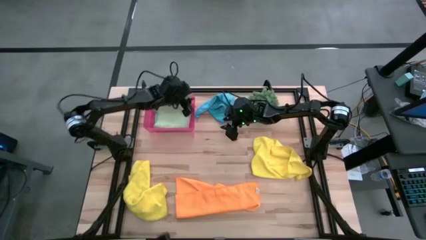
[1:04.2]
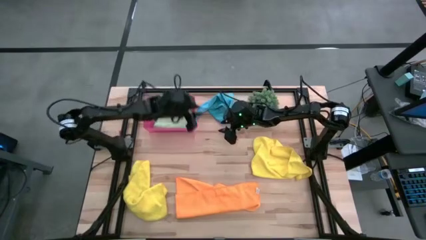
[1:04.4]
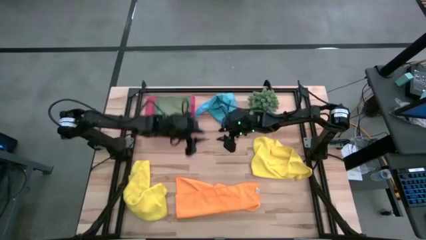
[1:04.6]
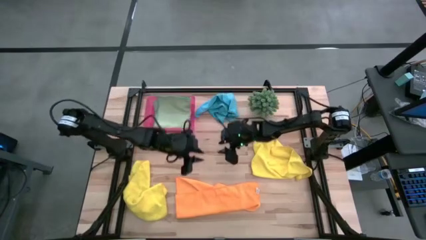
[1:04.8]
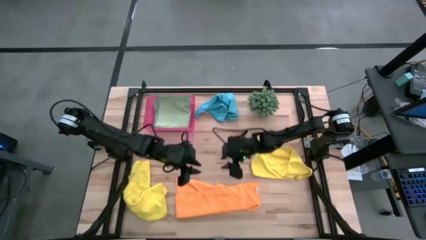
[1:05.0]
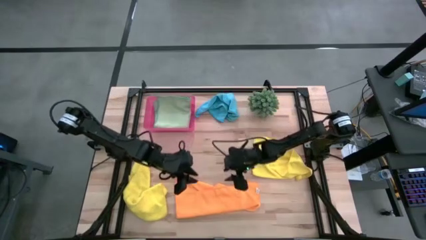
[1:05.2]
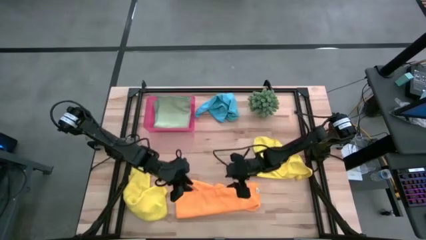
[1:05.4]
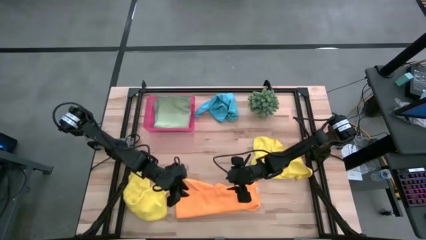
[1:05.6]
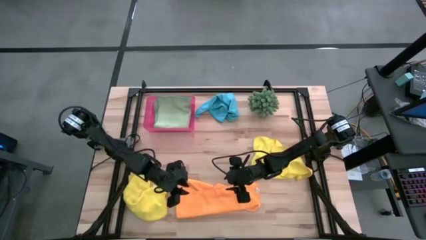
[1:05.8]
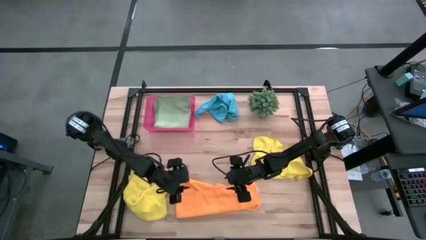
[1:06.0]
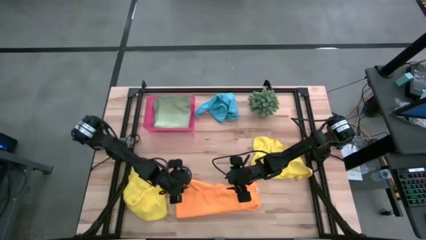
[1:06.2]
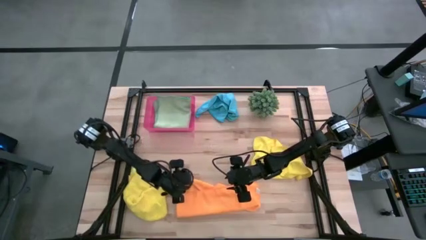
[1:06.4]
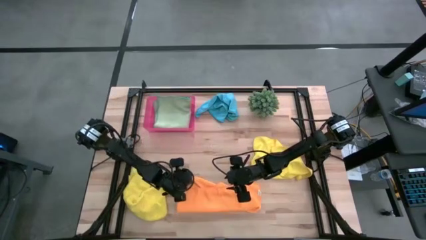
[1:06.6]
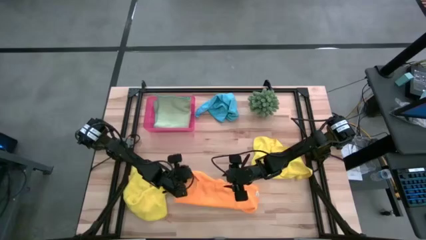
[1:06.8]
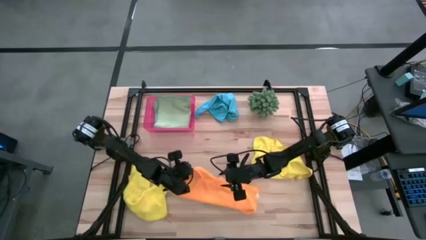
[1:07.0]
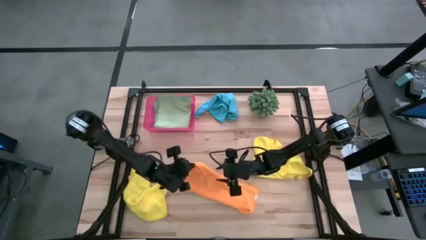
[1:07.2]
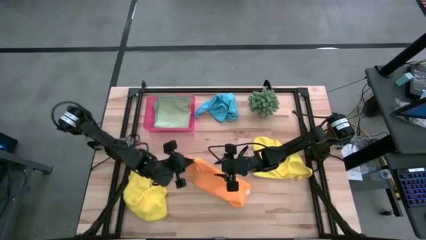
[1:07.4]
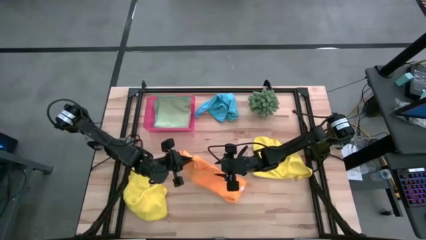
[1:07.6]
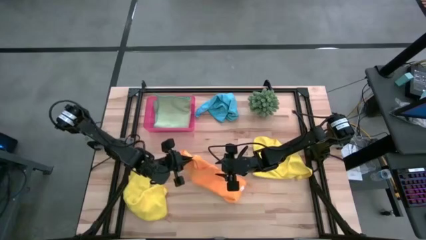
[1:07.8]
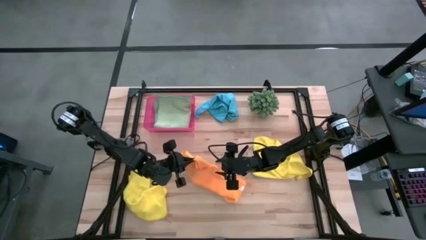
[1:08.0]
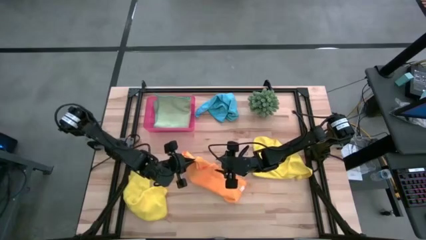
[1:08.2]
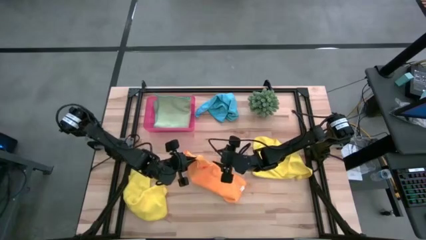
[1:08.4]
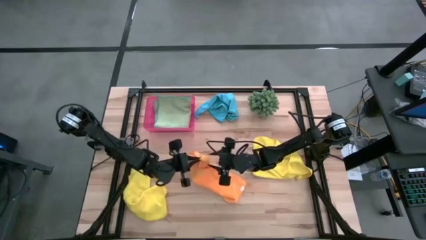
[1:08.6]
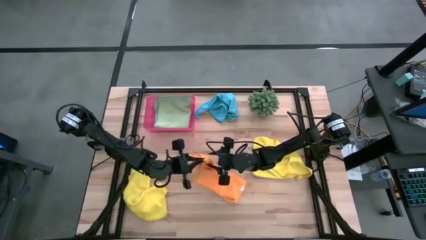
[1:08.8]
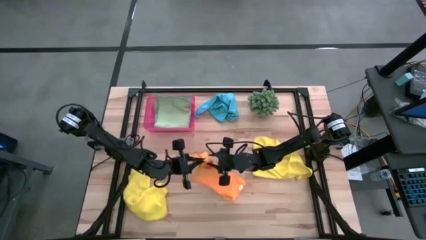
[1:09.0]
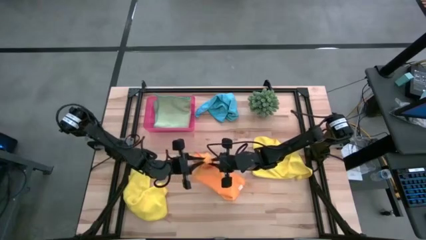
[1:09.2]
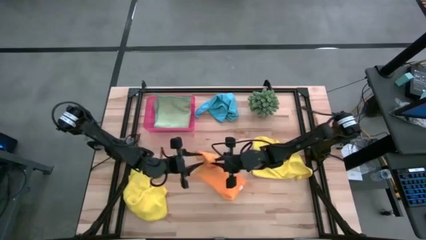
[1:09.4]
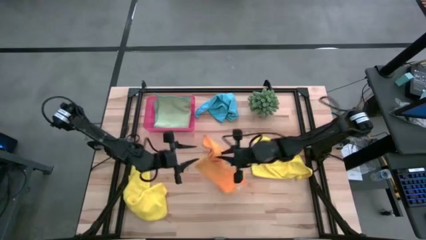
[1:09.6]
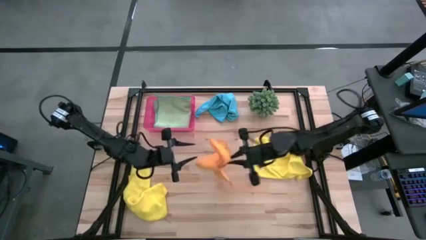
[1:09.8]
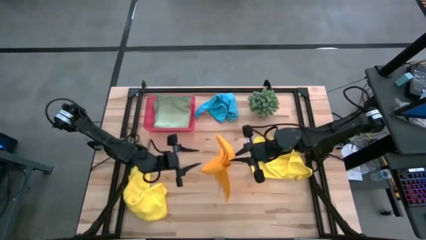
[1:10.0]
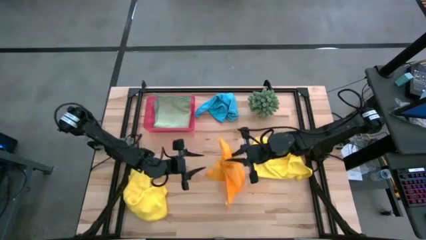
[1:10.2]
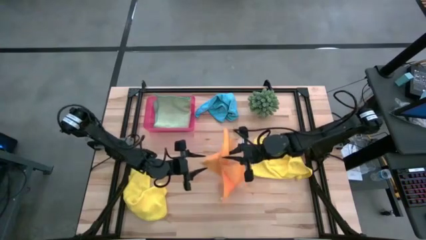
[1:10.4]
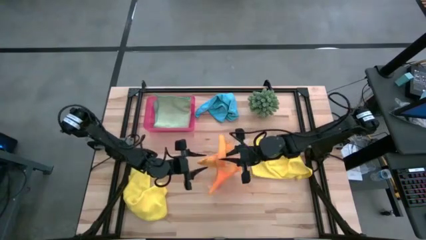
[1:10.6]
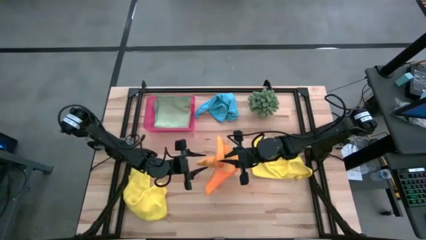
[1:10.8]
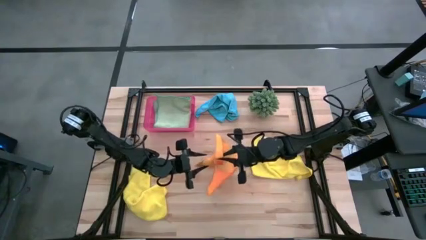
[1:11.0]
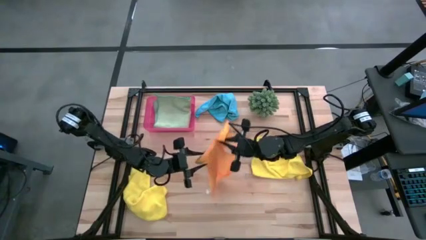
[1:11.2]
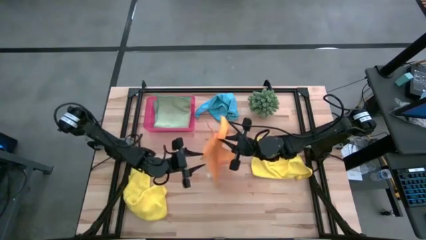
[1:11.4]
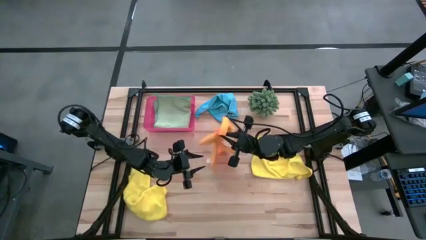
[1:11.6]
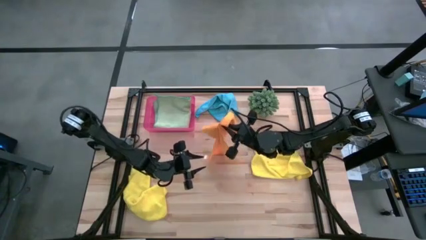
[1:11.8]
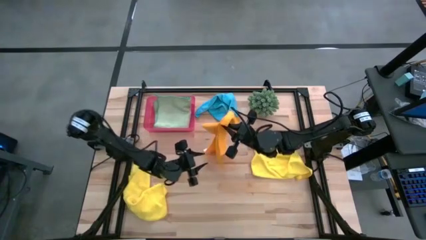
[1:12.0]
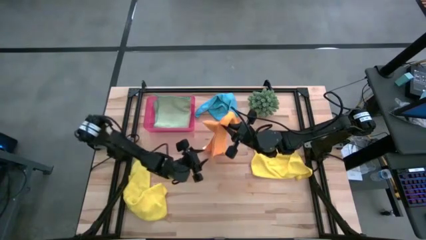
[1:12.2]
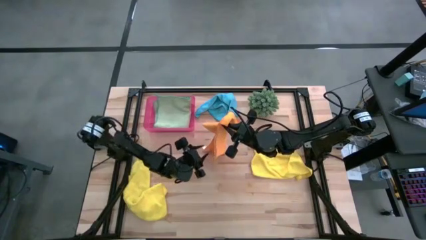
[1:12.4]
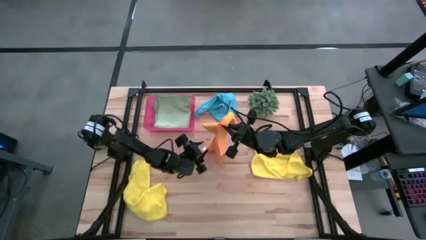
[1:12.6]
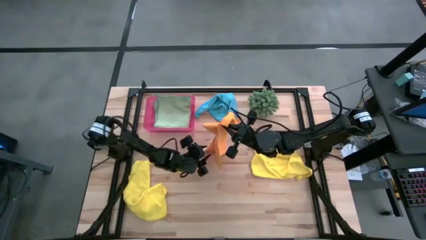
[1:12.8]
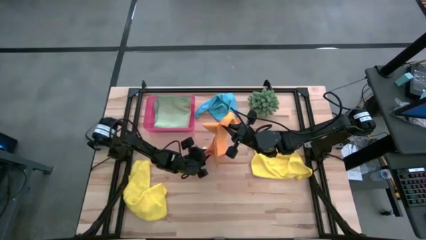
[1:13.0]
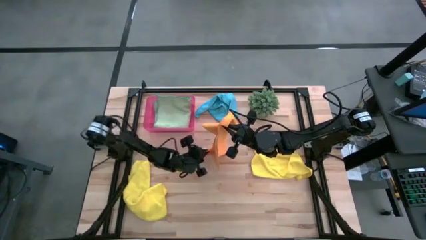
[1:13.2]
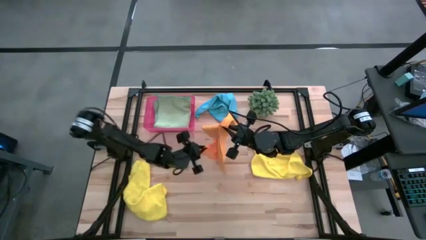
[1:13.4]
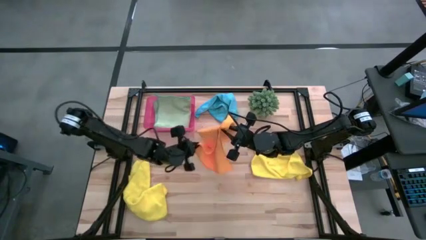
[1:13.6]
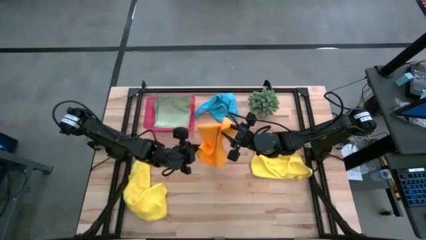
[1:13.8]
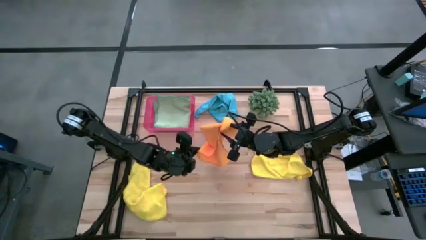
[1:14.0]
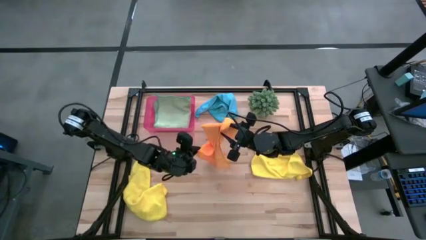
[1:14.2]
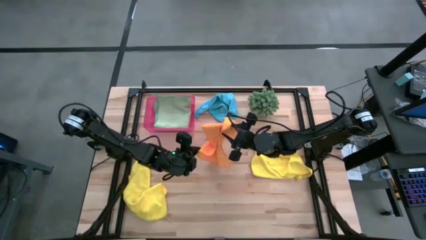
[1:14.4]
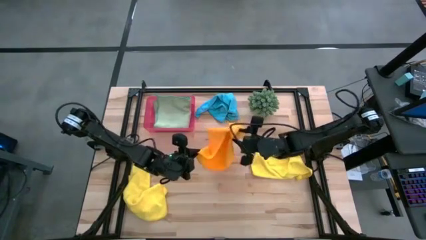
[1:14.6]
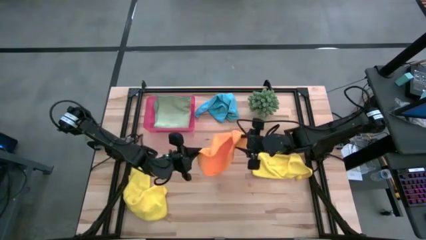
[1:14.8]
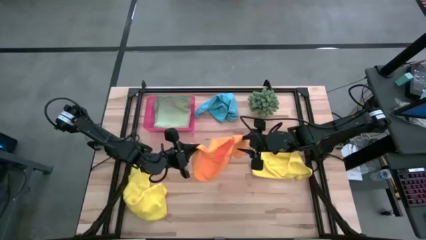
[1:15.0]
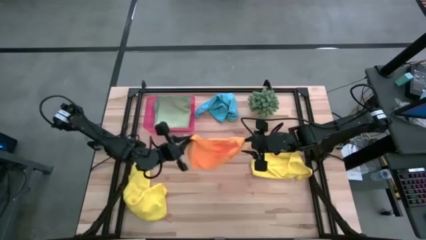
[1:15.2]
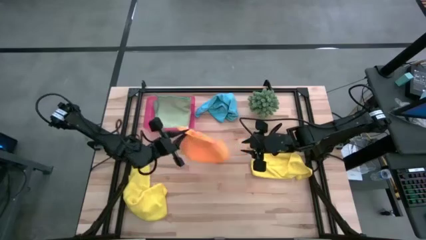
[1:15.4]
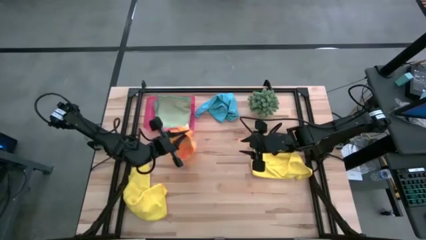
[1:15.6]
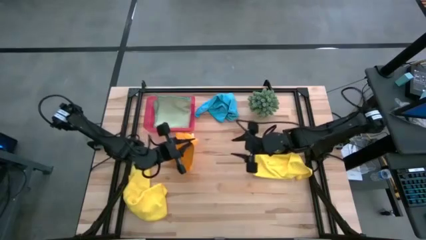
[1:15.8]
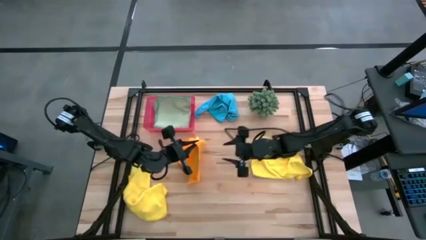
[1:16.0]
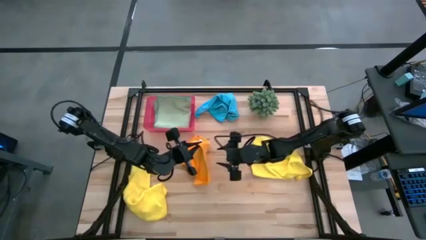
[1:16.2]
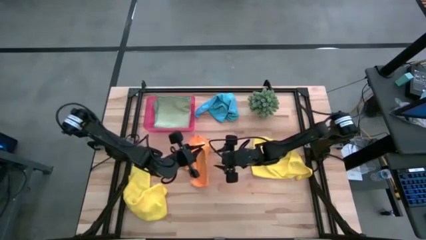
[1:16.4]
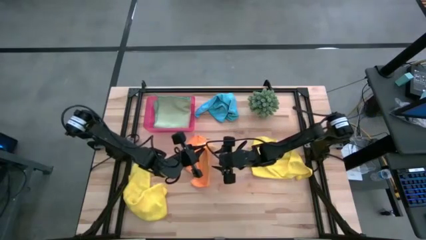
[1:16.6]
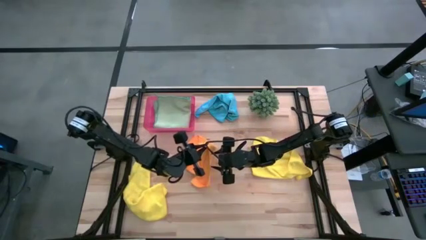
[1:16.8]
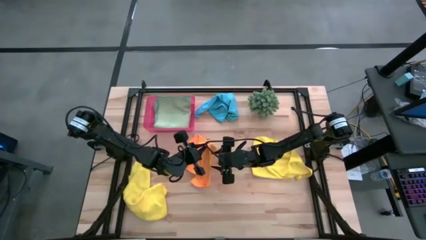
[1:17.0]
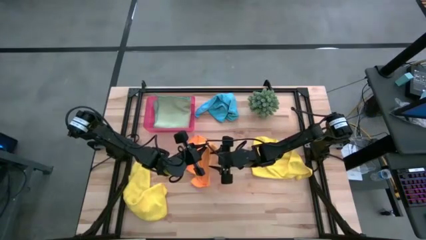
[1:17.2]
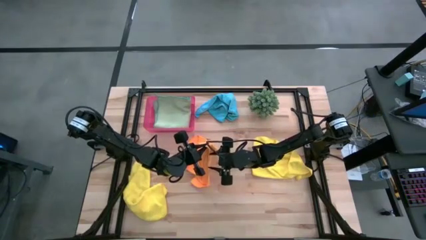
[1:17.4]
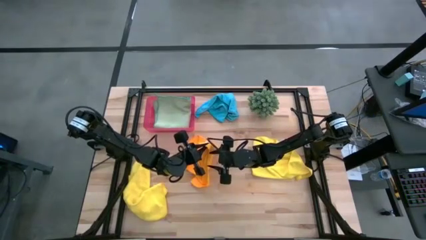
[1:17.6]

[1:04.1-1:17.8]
Task: Fold microfiber towels
Fold the orange towel
